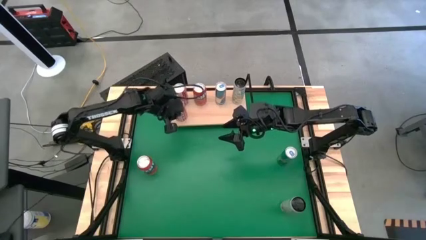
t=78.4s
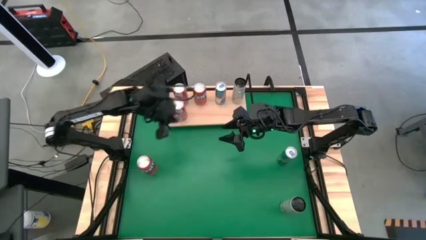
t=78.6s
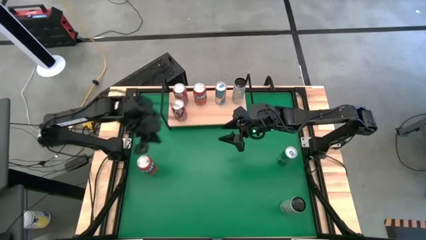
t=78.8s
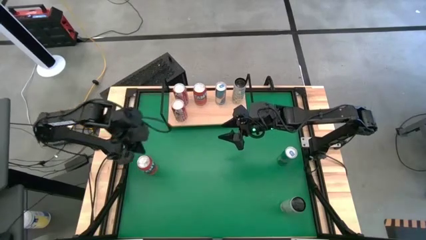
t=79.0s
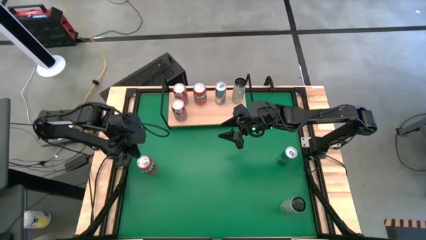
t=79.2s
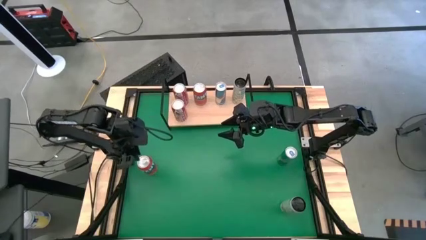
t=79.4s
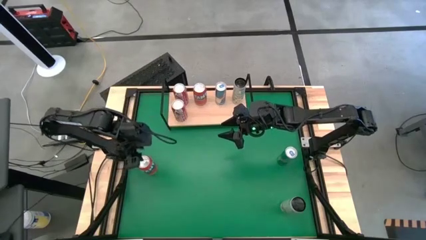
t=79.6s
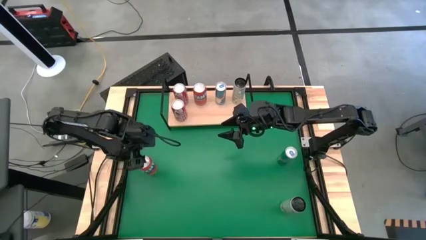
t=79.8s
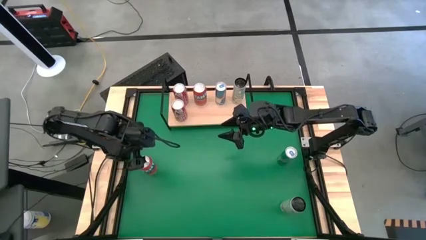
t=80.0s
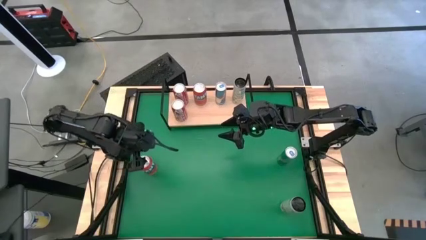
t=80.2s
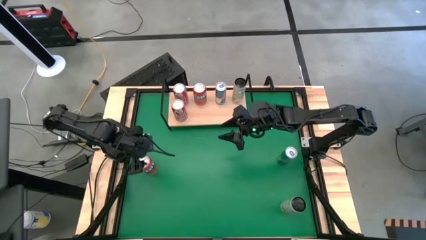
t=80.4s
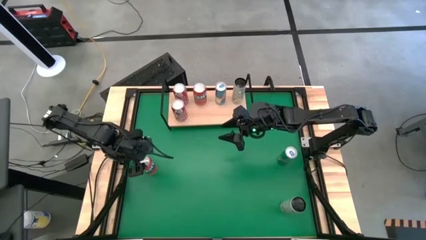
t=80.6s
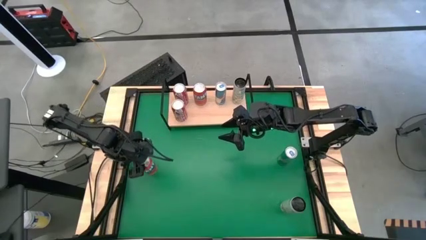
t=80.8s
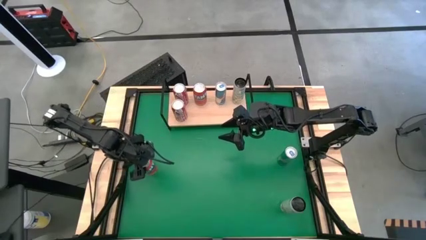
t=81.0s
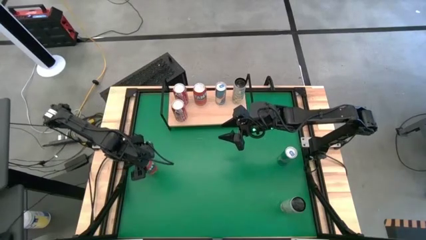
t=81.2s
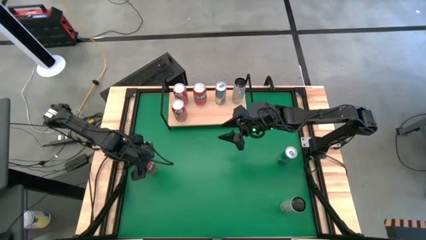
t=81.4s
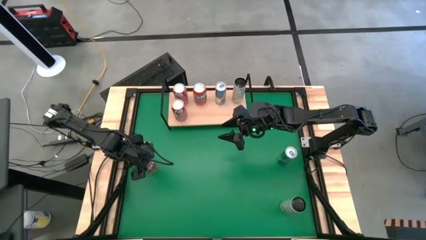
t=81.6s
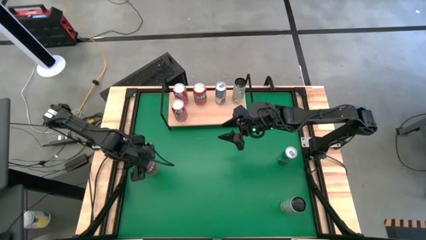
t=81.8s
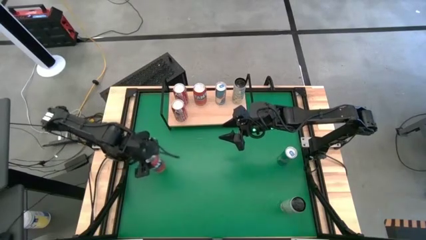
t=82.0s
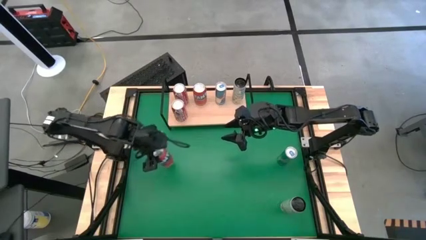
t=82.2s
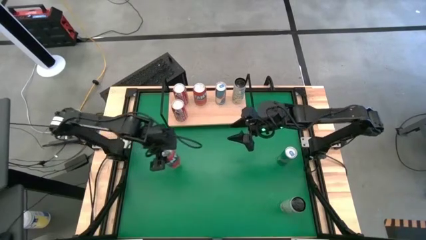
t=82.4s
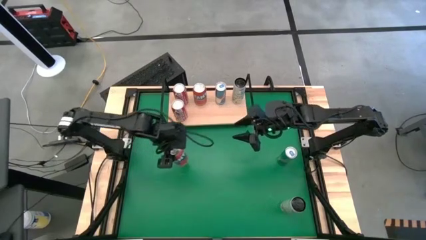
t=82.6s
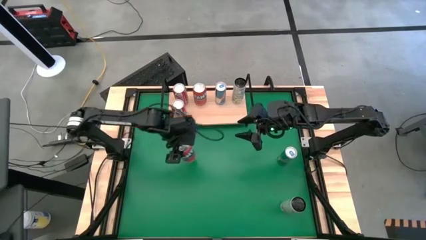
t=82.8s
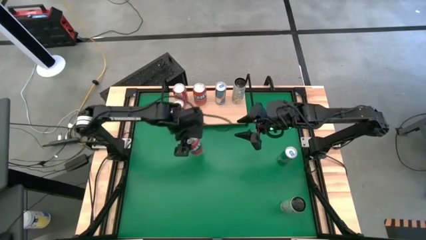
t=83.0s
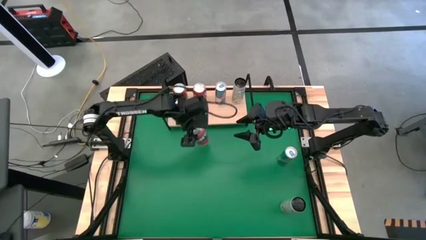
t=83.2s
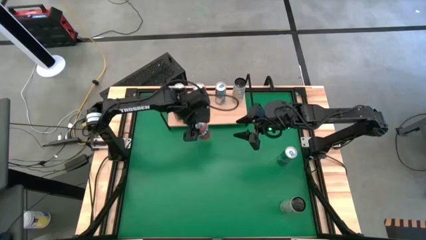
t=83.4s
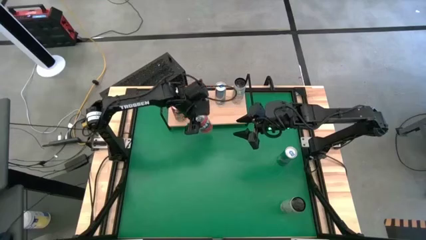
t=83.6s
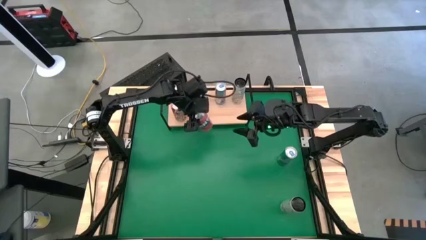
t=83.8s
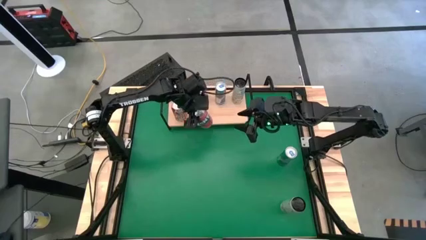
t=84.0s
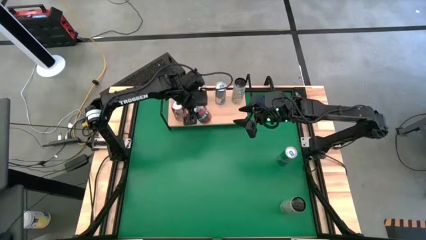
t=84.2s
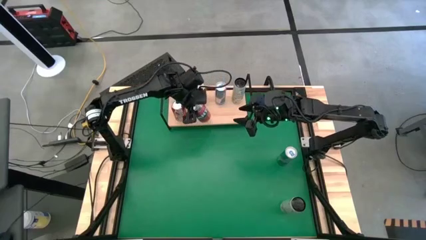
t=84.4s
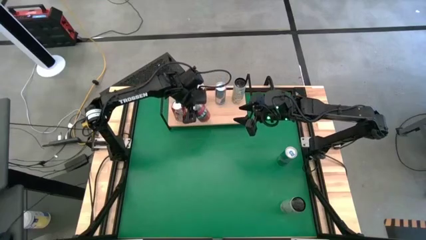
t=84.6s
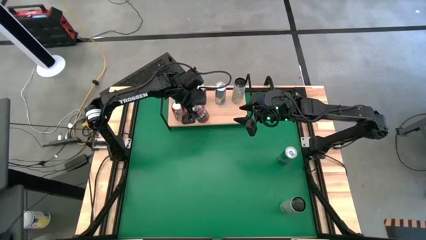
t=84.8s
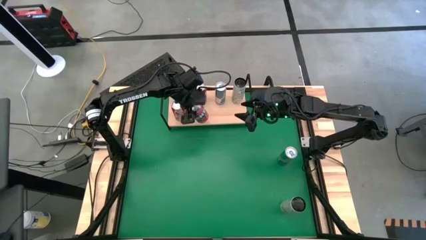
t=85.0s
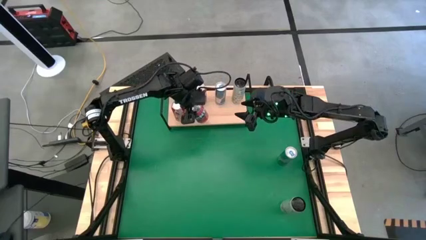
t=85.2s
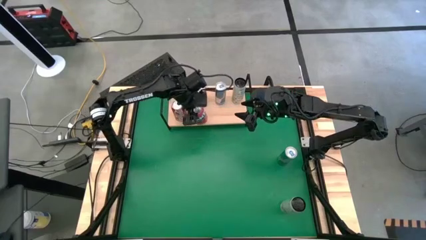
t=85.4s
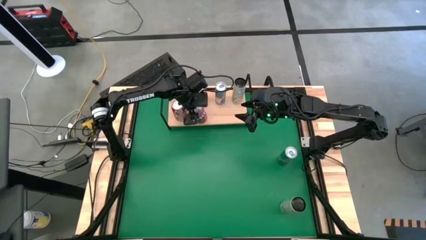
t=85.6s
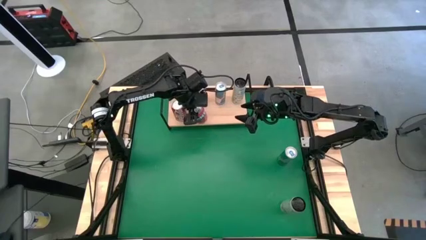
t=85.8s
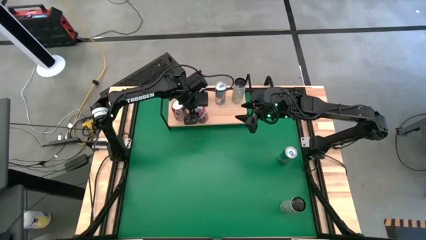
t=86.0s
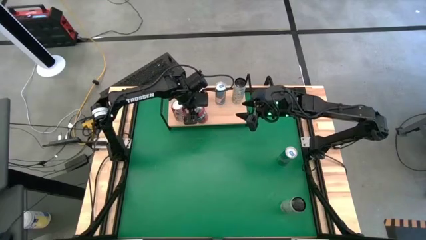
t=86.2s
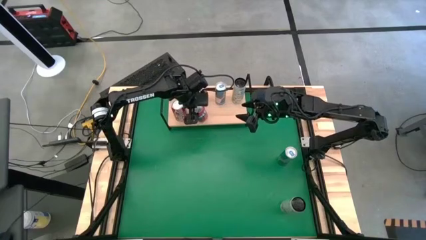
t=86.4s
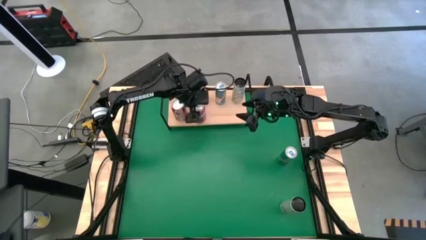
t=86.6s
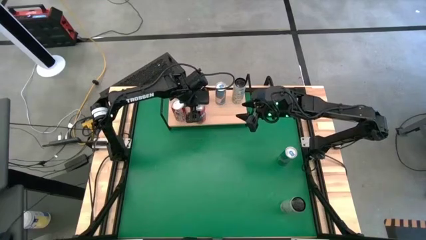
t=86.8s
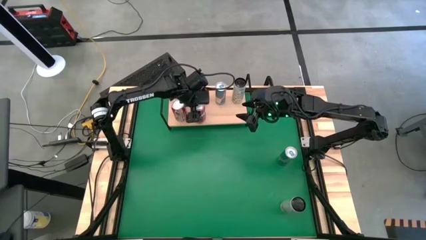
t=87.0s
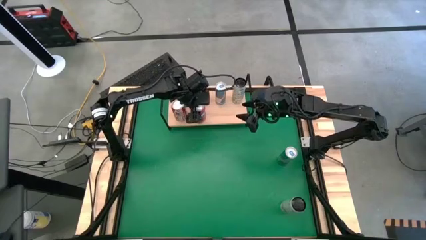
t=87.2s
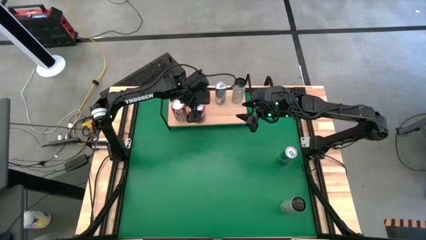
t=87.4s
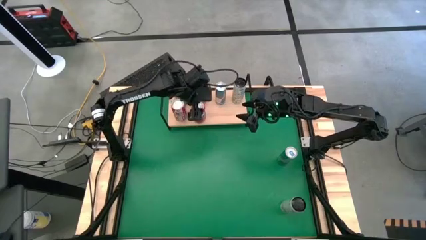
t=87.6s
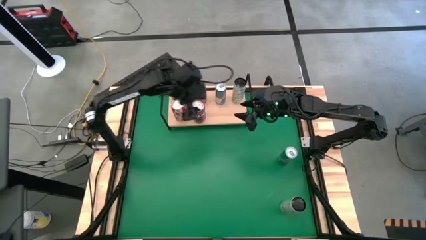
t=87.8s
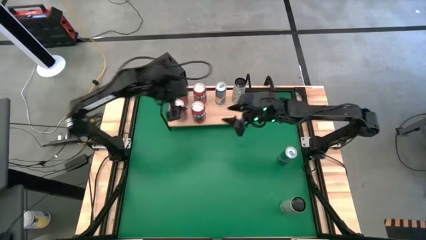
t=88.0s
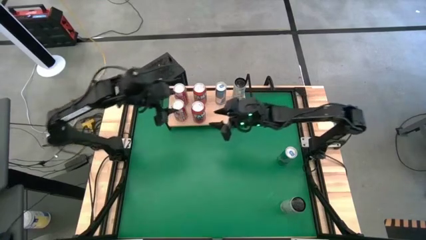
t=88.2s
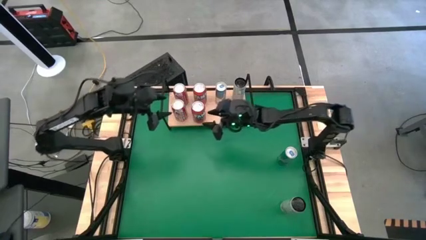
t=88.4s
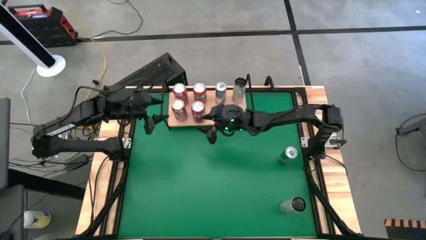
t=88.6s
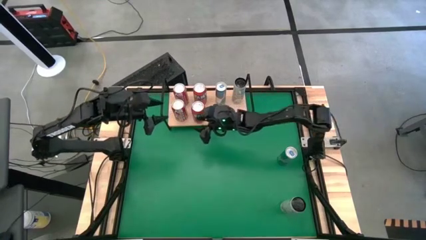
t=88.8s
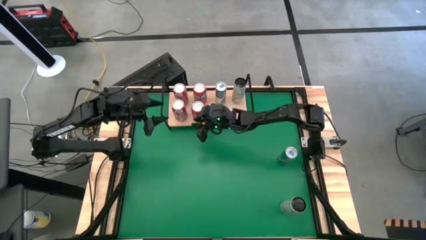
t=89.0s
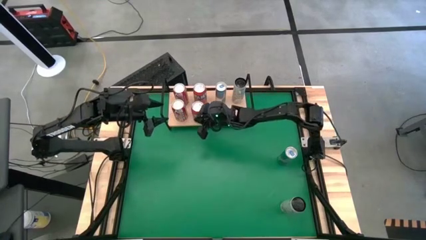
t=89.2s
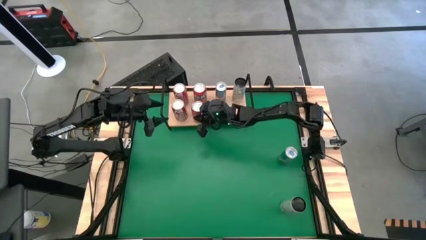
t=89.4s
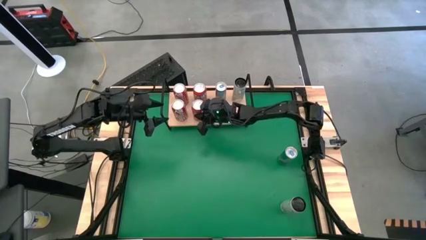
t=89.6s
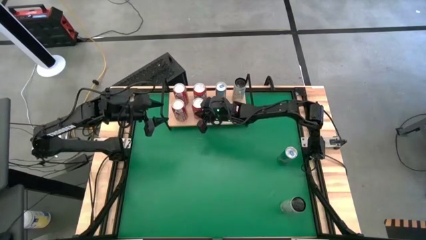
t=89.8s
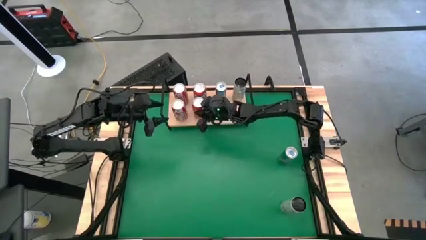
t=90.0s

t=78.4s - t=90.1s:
Task: Place canned beverage on shelf
Put the red soda can on the shelf

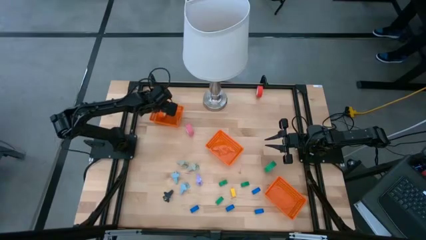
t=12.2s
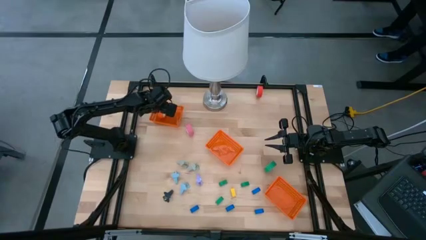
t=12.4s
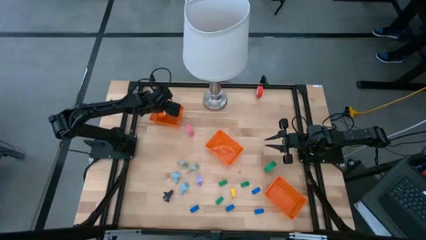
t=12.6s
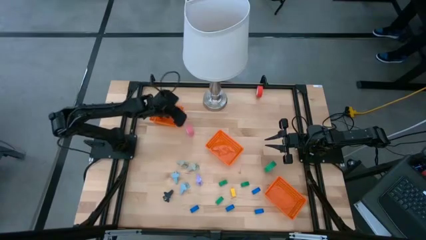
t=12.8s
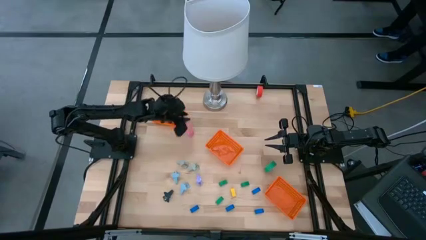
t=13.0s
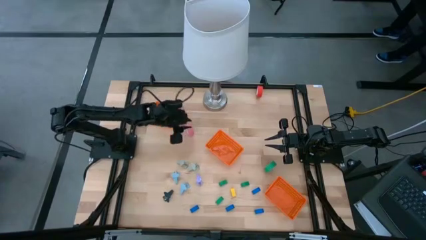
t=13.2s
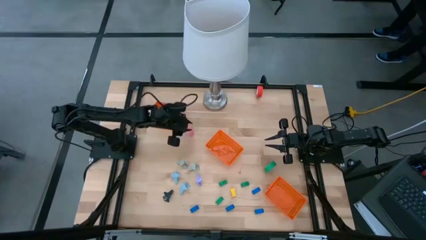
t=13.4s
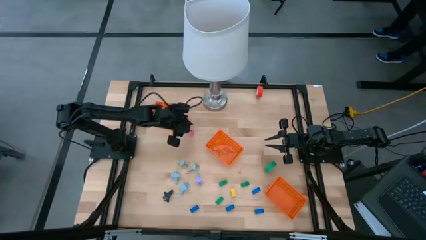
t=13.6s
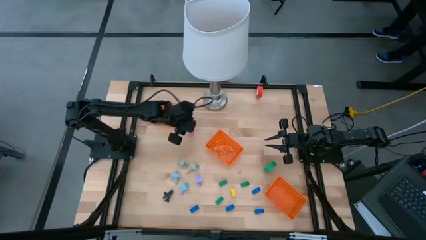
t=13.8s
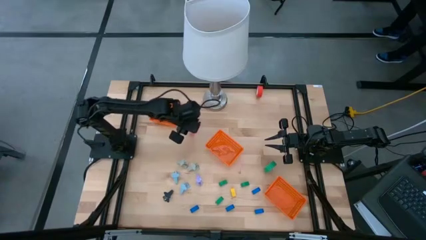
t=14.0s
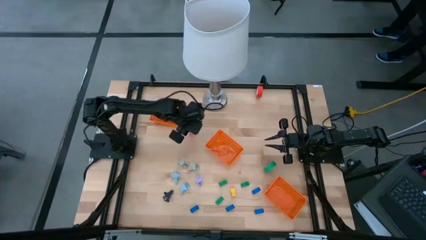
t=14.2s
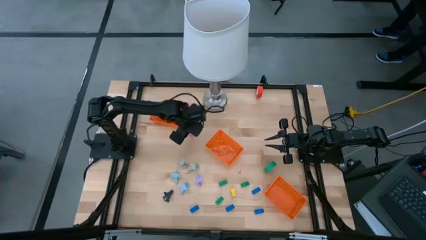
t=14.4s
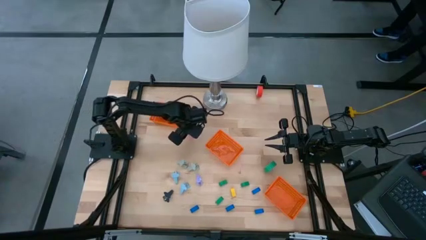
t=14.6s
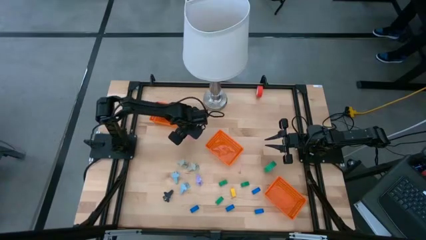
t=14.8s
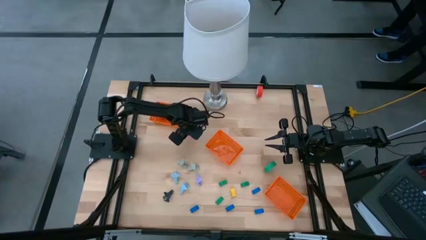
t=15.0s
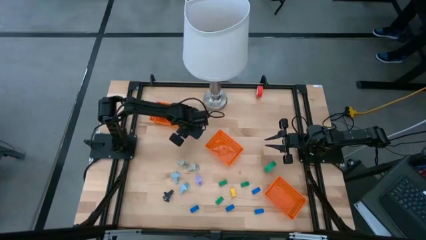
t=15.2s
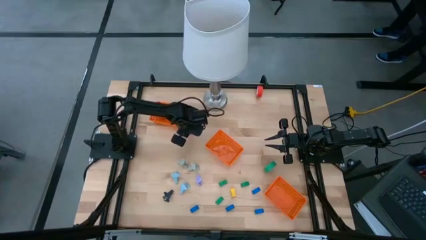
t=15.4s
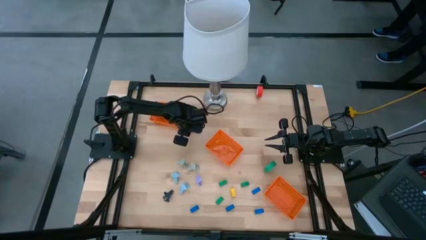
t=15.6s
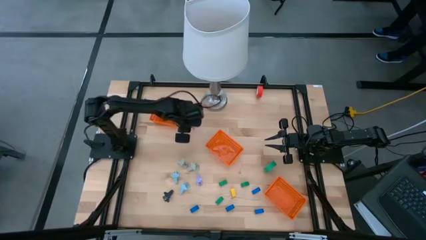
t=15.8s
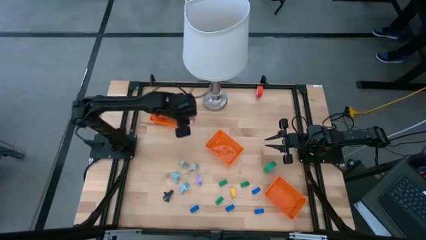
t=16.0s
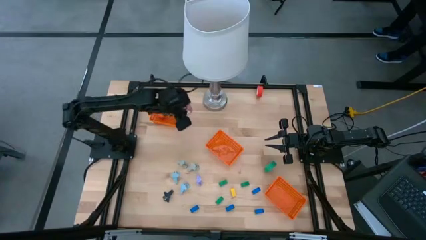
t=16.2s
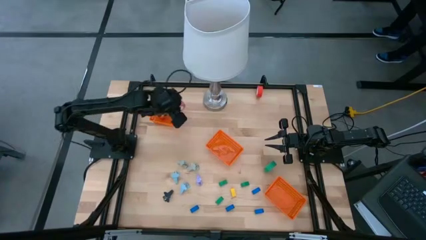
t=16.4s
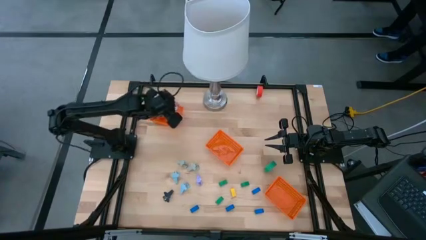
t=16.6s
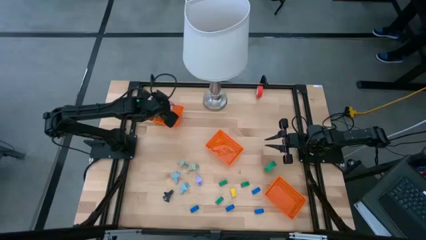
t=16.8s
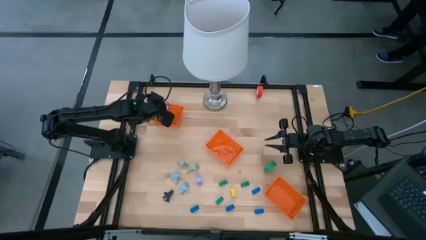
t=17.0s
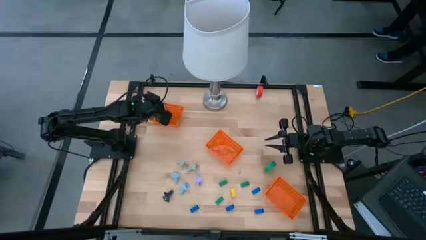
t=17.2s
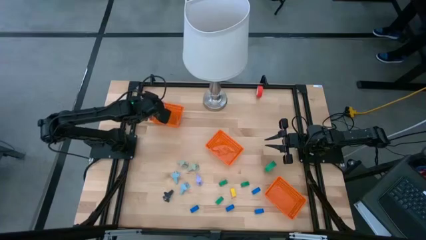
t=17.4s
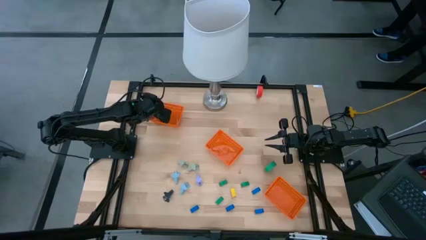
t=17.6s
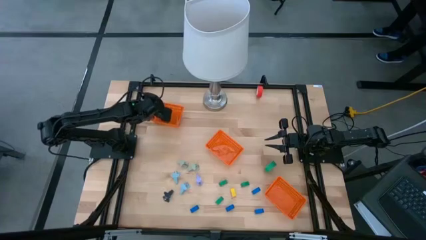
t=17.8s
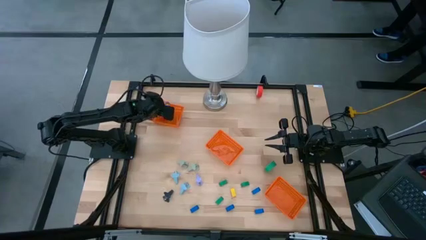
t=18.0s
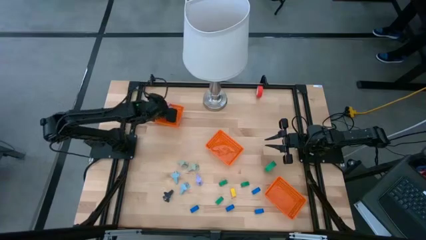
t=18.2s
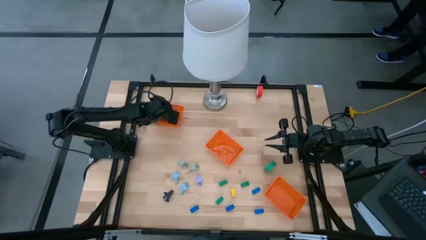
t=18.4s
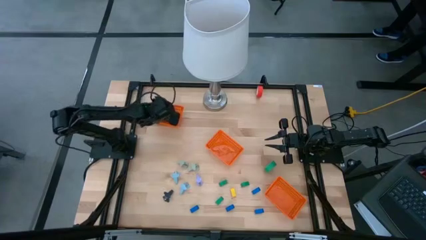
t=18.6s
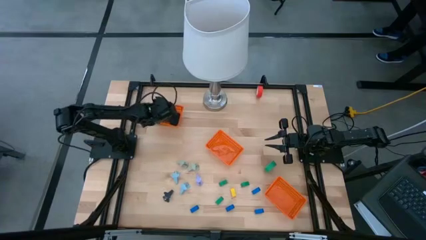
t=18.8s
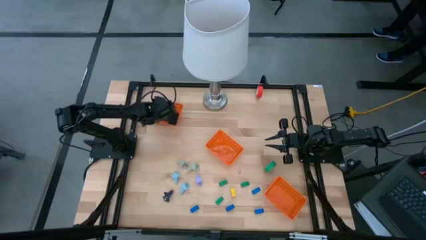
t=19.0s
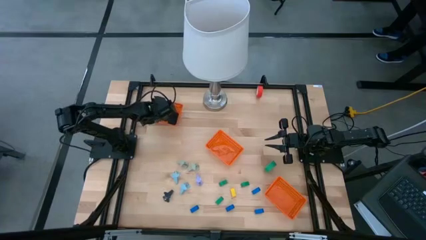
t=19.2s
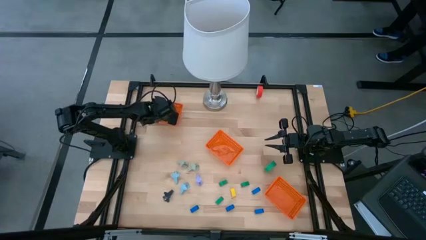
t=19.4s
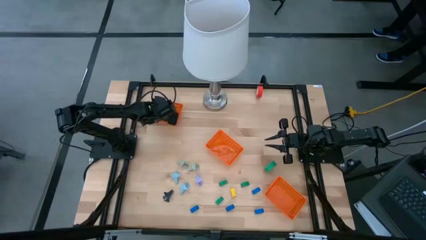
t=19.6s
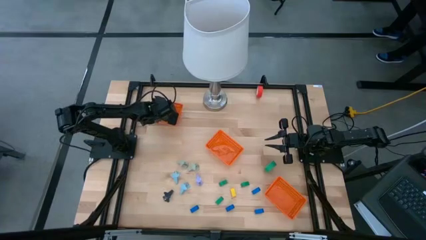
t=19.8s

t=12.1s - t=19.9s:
Task: Pick and place Stapler, Stapler remover, tape
Put the pink tape into the top orange bin
